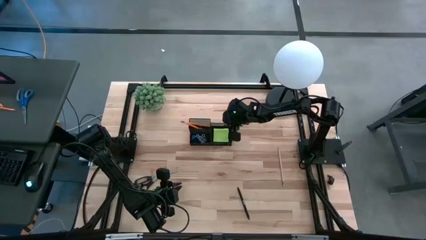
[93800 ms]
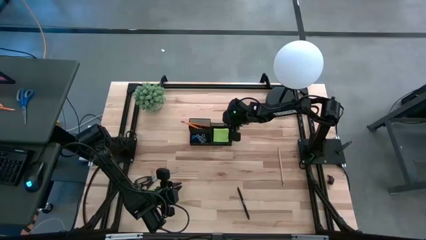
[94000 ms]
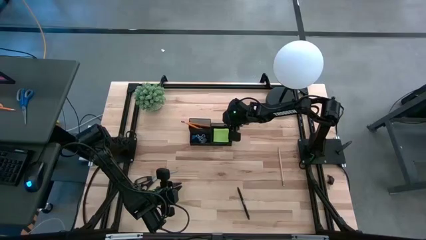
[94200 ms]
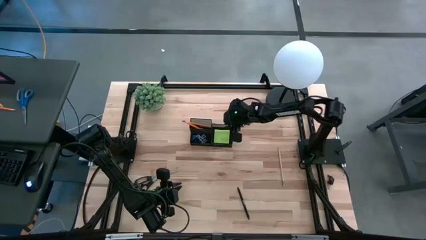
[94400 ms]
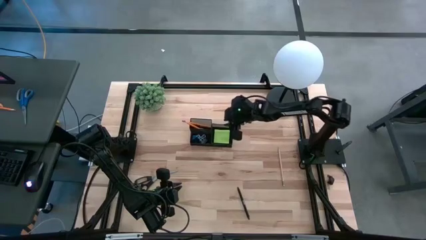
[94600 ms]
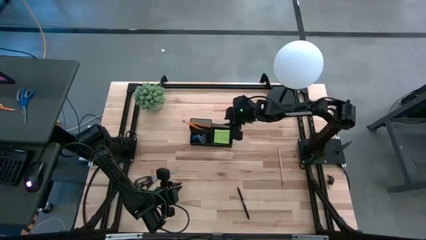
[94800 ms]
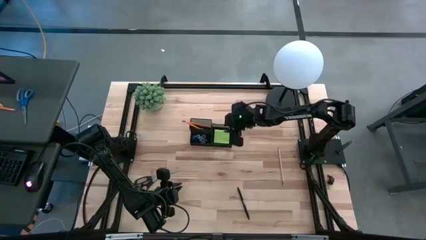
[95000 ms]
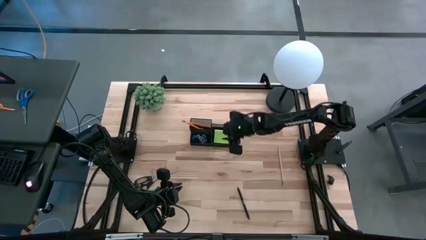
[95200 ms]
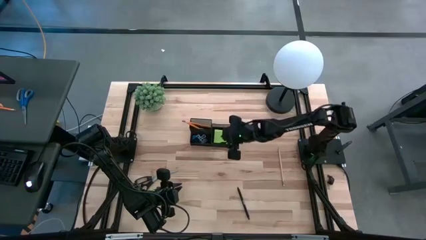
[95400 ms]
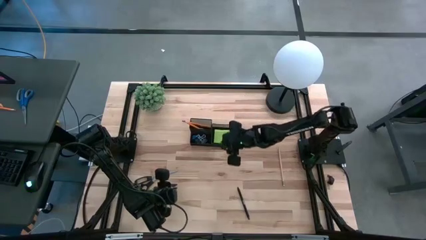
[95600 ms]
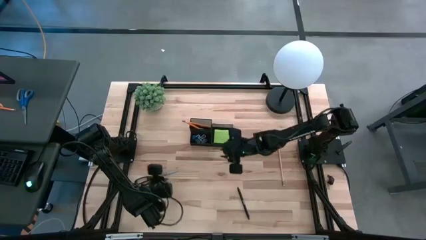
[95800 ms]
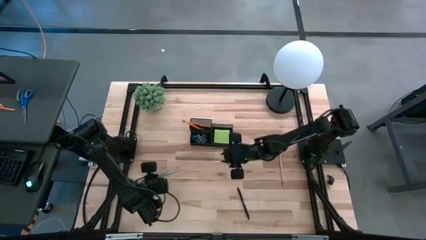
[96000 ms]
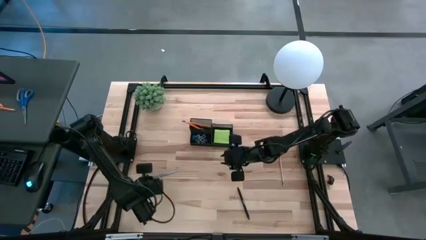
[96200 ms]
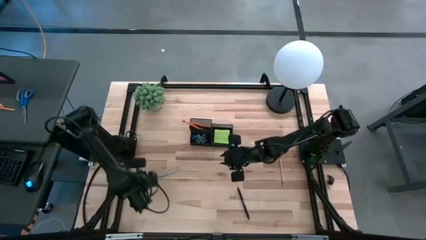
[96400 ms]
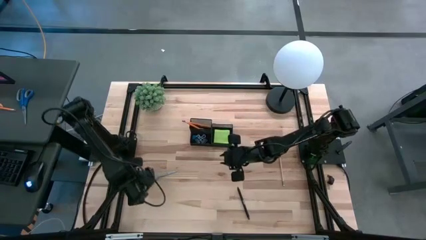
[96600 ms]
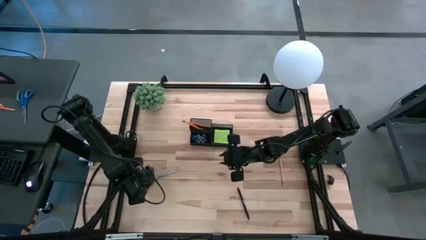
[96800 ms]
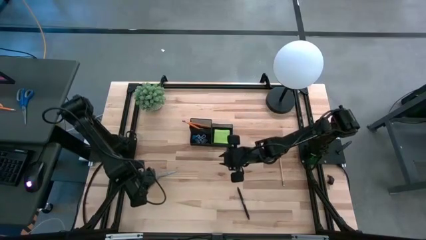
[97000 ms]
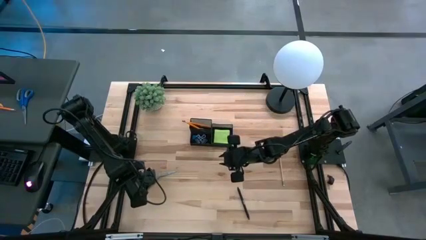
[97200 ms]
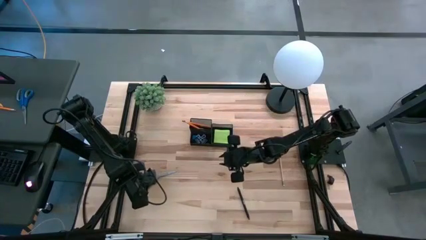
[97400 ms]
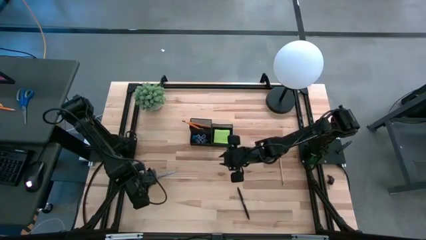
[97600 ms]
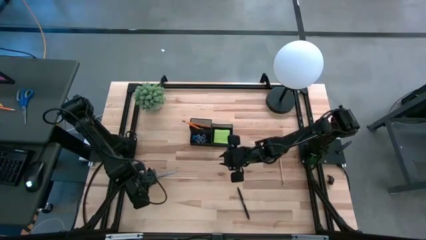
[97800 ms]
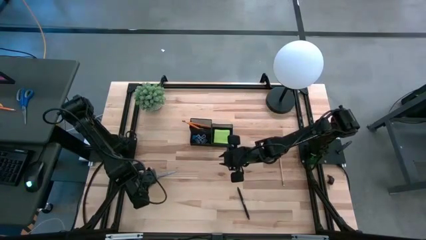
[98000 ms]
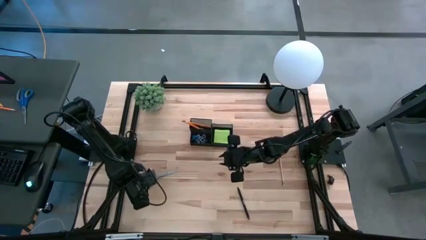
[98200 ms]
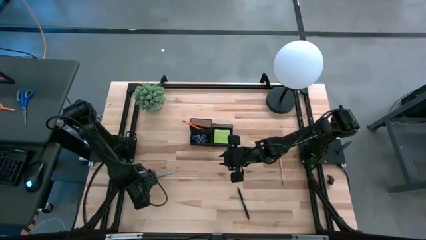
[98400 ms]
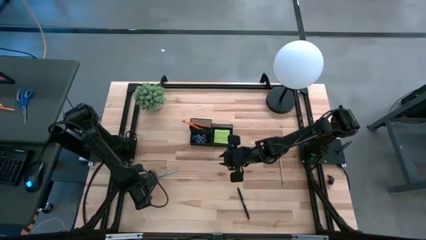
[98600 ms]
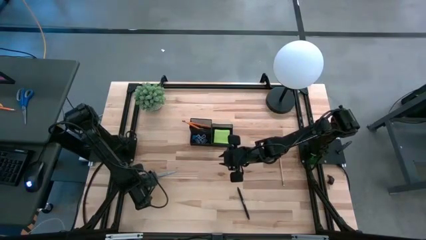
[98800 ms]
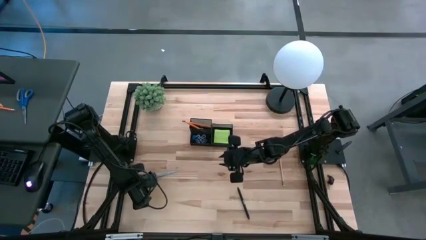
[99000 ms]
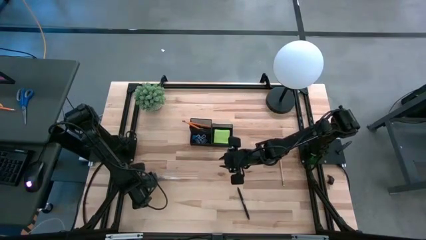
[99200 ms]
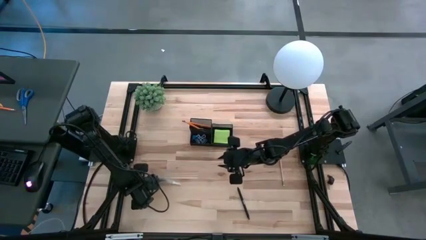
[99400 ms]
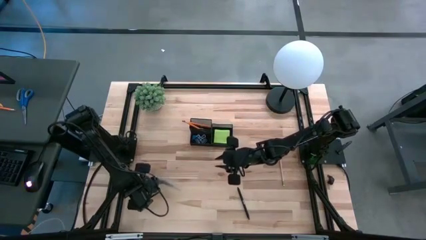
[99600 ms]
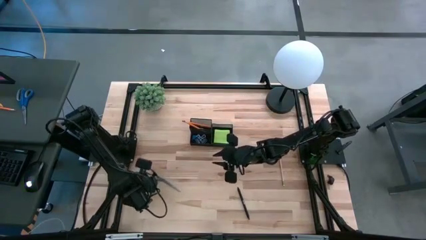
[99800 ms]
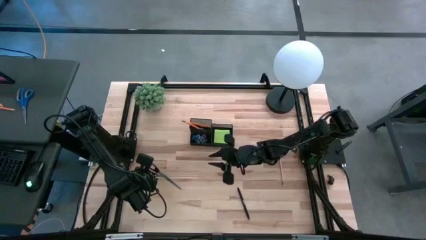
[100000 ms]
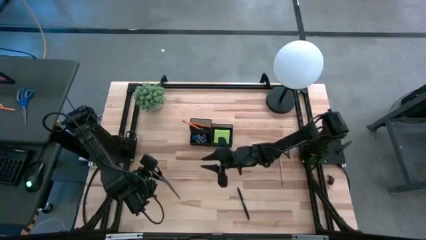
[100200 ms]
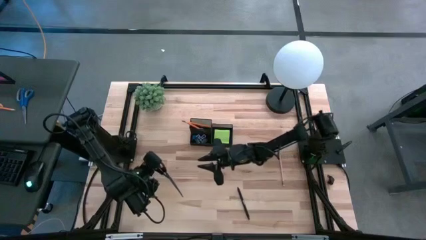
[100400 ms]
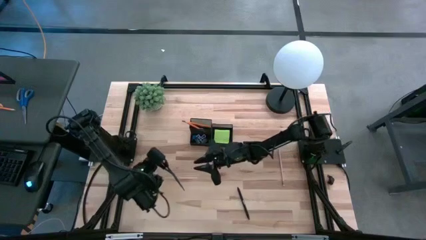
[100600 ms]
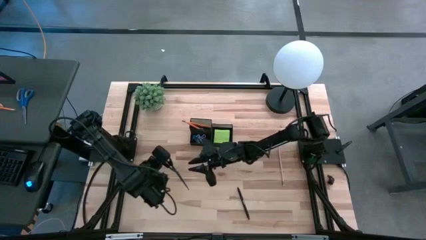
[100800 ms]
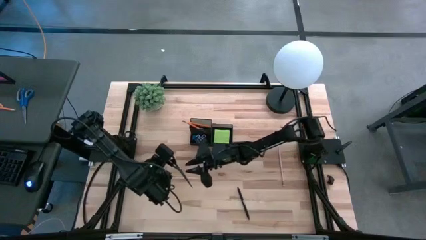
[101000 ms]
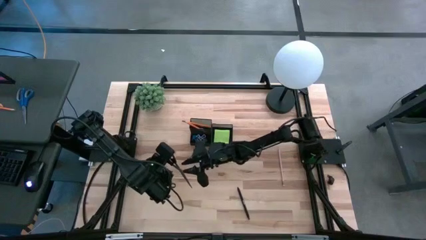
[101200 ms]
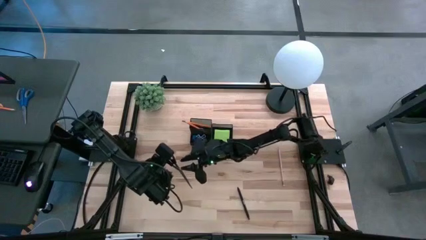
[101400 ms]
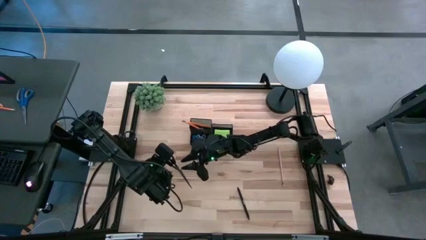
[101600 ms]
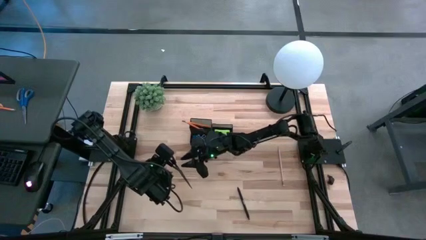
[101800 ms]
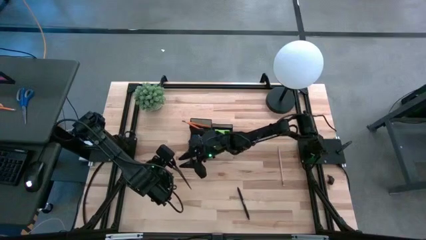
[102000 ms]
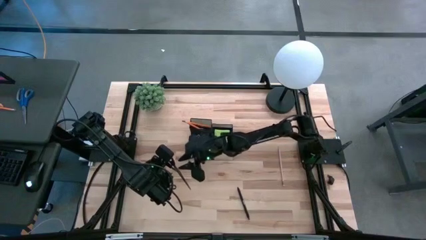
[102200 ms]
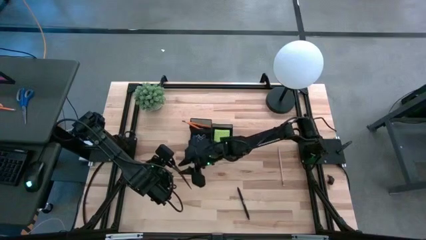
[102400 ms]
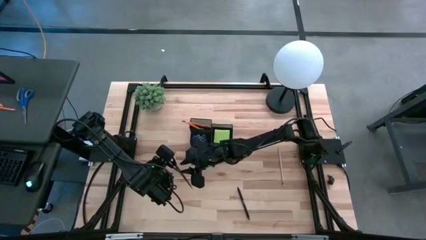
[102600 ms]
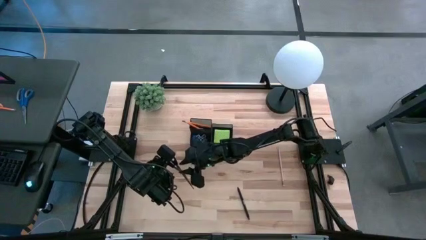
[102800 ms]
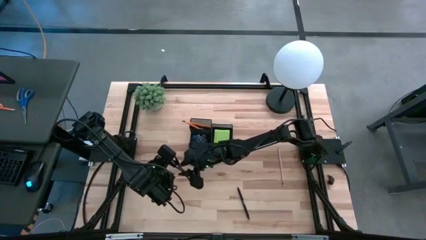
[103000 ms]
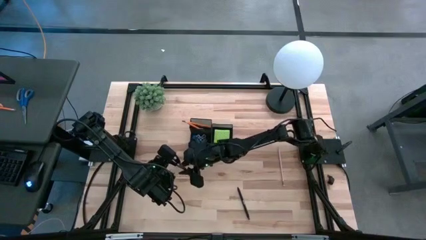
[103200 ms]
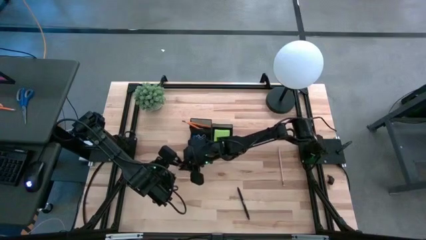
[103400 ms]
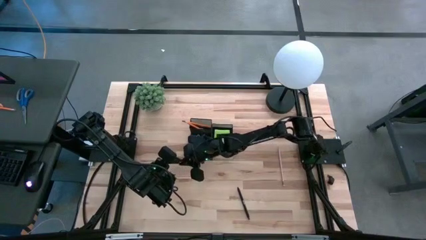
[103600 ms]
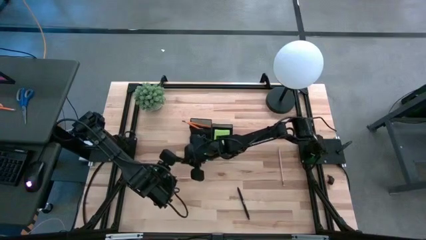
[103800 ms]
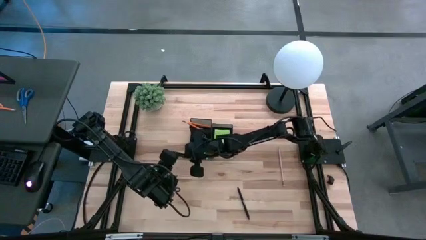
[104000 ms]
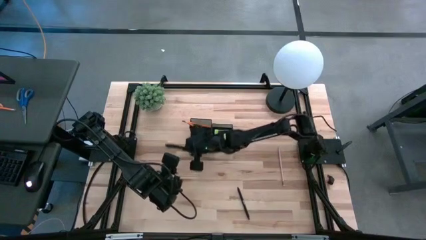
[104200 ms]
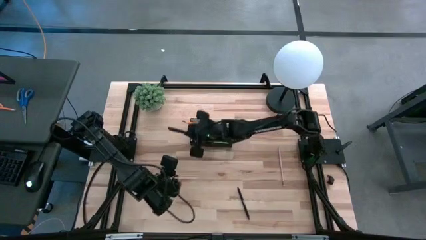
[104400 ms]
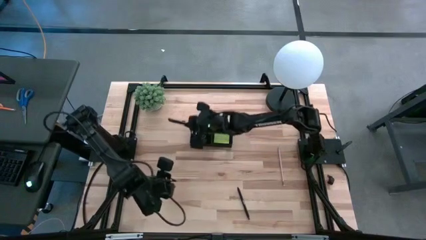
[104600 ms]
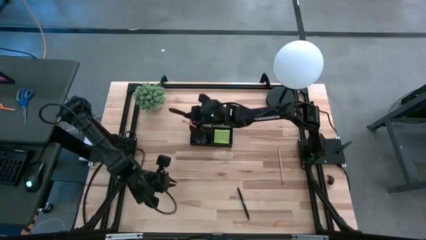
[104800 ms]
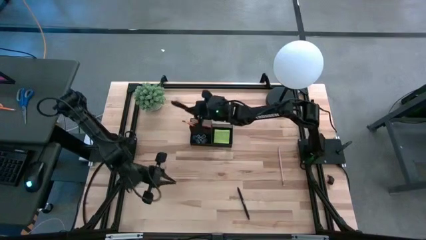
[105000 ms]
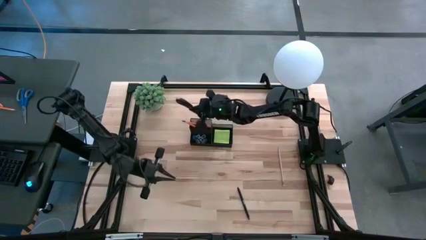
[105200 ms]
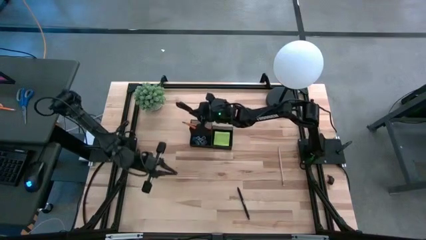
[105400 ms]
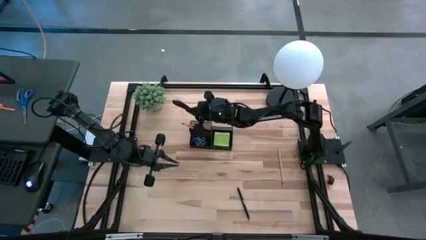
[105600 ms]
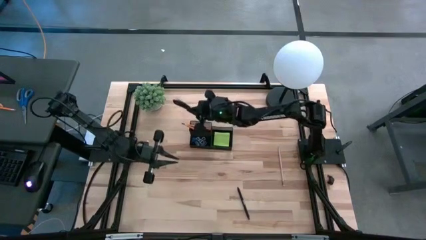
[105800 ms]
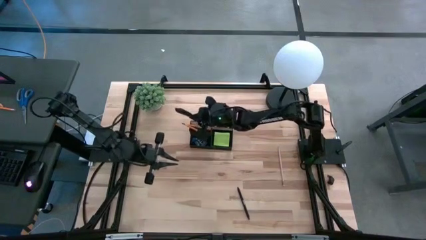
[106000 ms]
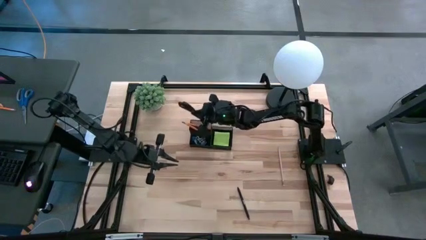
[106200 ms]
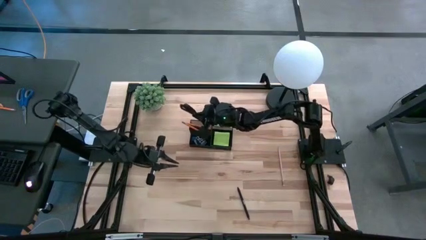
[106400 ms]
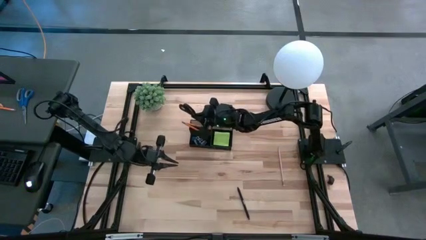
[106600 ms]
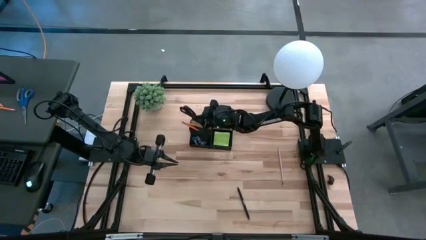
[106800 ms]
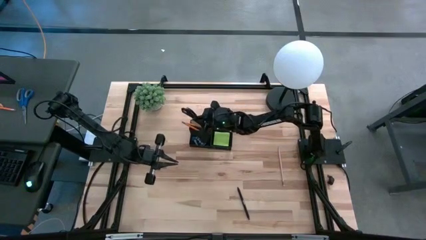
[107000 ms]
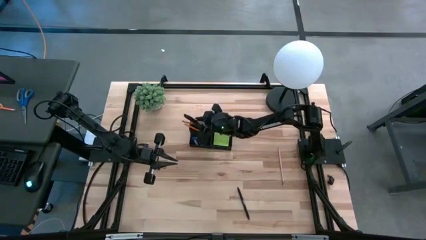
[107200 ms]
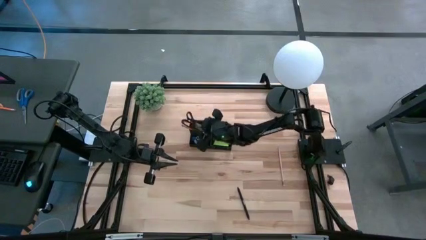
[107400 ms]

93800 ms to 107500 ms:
Task: Pick and place office supplies into organizer
Put the scissors into the organizer bin

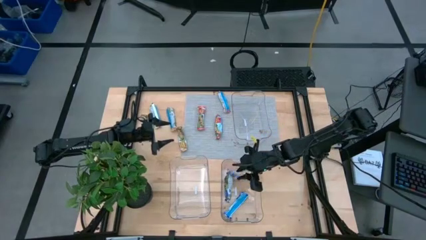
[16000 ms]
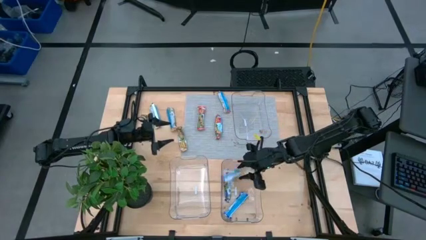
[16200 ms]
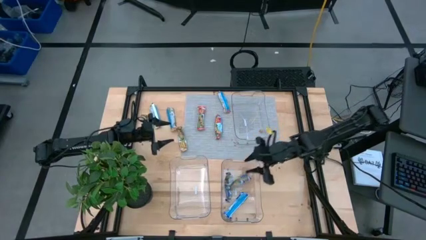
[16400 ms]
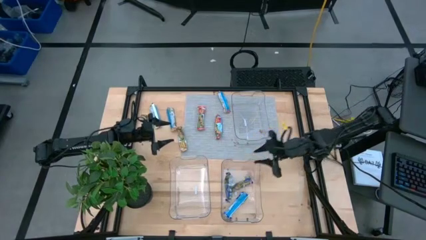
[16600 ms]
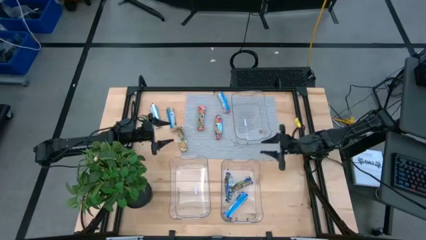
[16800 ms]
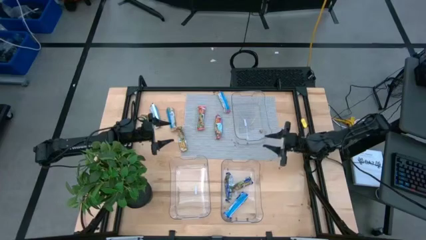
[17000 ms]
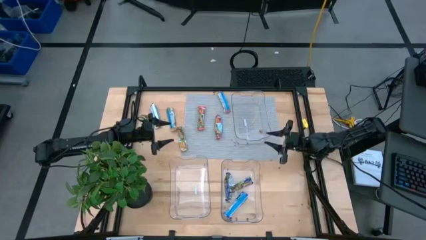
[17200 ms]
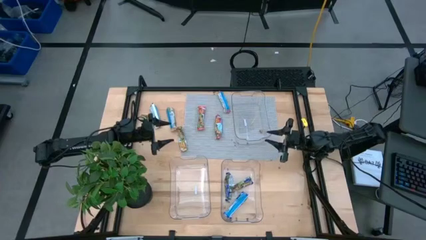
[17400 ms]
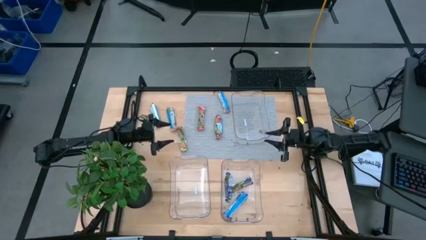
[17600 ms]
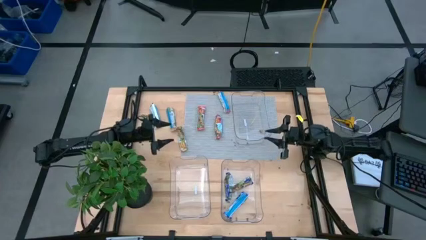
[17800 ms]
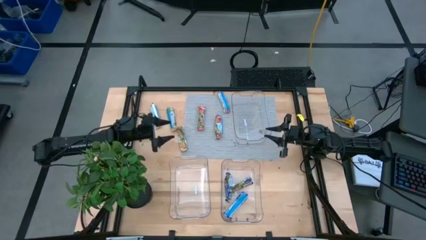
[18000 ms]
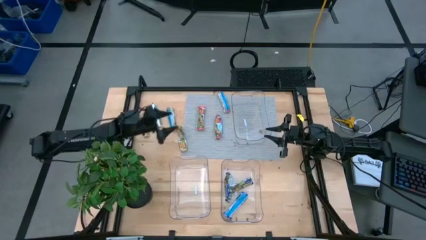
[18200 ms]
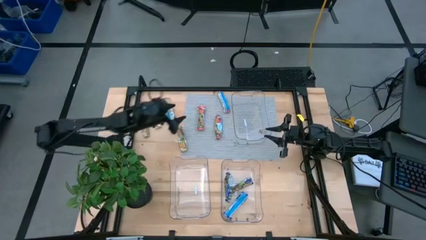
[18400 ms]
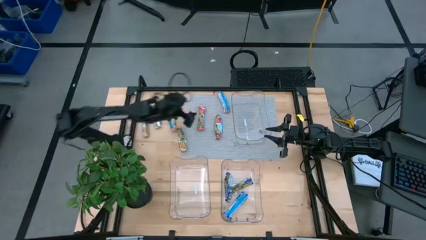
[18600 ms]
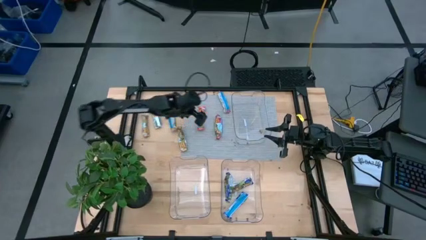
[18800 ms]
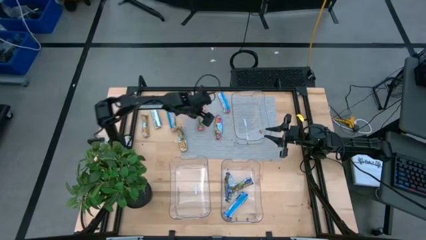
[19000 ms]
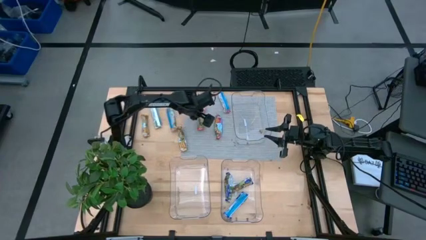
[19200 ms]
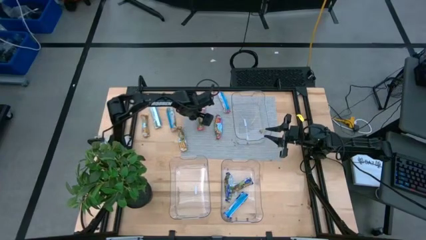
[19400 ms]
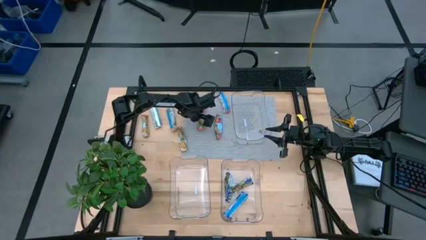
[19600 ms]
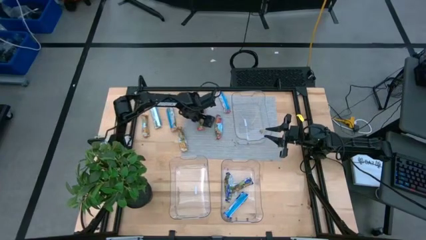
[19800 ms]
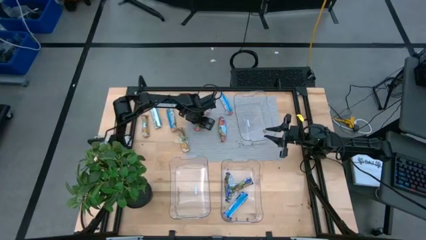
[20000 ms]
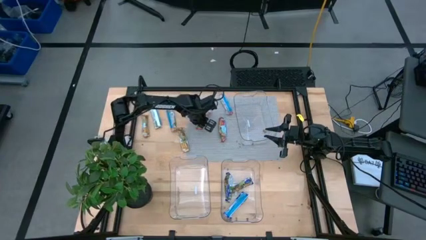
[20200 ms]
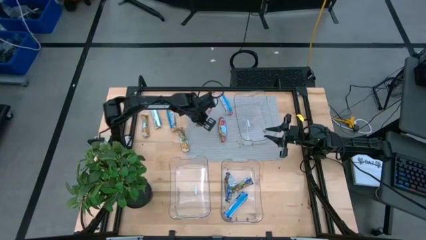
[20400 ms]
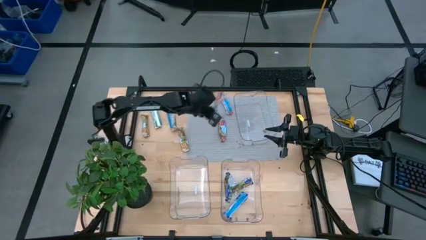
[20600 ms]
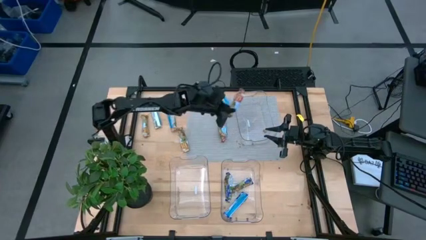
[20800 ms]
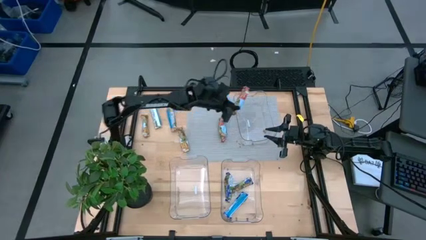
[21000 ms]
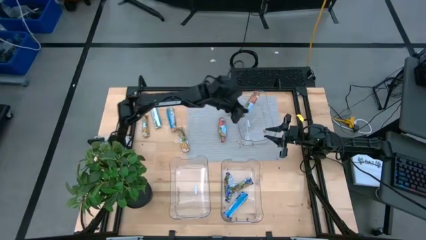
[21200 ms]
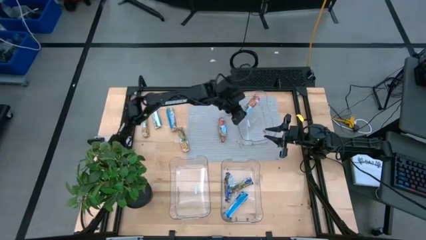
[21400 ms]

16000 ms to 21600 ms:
Task: Pick and place Granola Bars by type
Put the bottom left red granola bar into the top transparent bin
